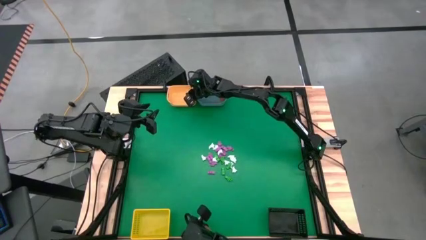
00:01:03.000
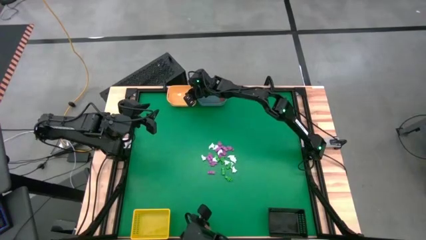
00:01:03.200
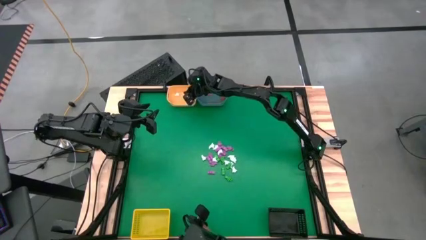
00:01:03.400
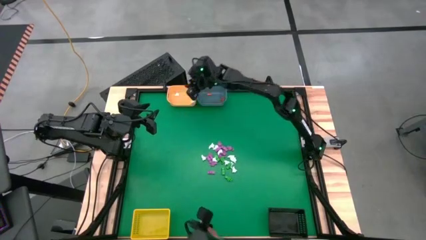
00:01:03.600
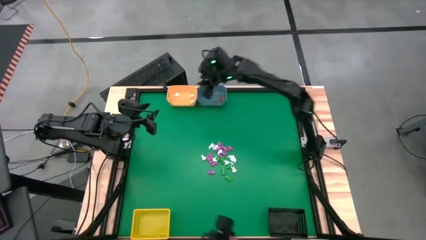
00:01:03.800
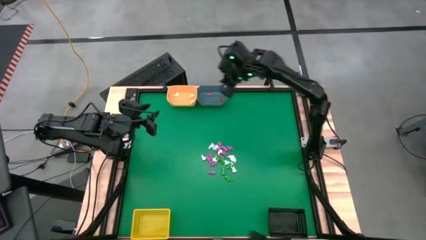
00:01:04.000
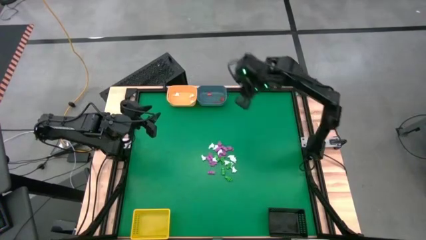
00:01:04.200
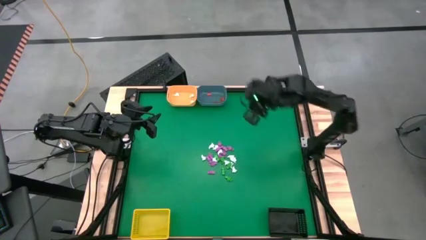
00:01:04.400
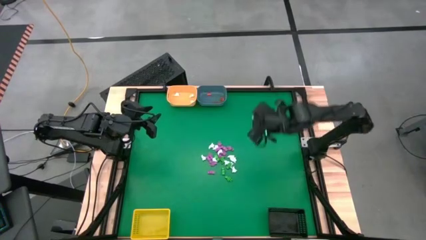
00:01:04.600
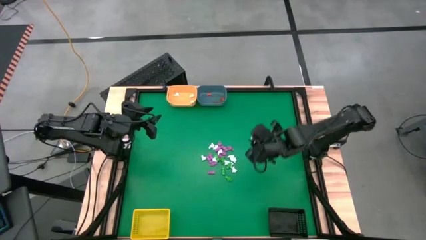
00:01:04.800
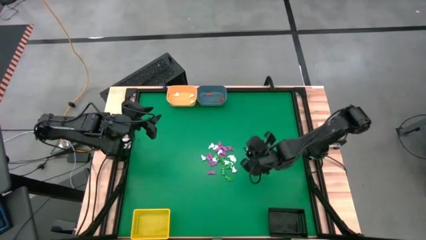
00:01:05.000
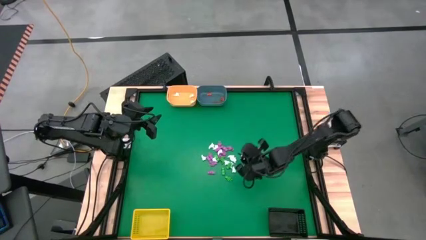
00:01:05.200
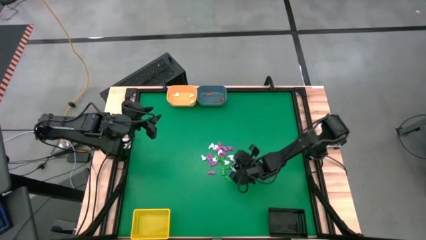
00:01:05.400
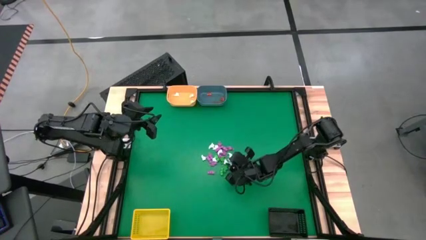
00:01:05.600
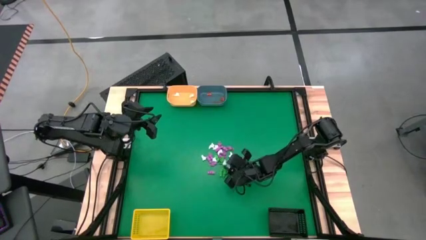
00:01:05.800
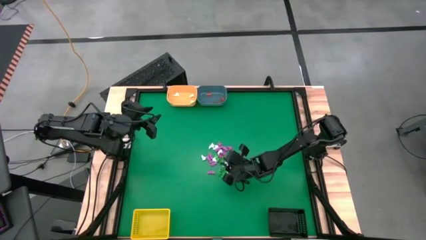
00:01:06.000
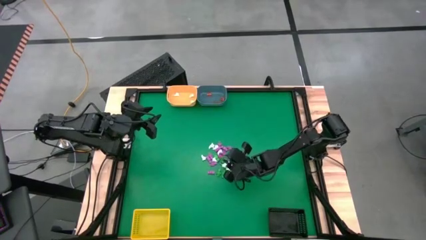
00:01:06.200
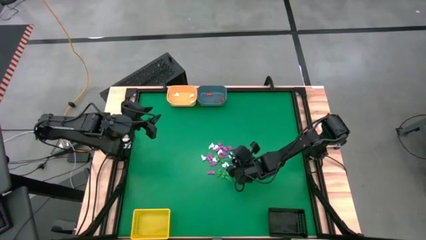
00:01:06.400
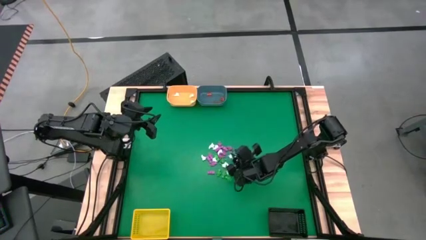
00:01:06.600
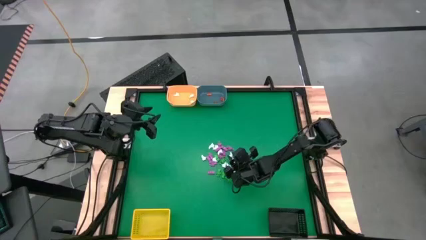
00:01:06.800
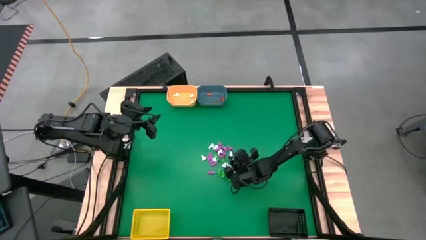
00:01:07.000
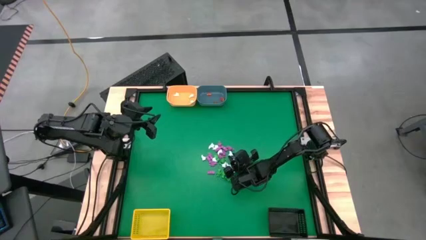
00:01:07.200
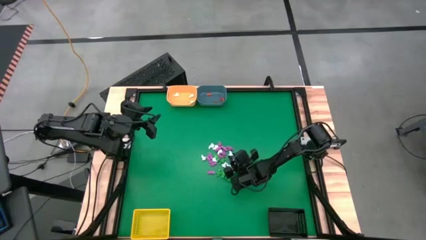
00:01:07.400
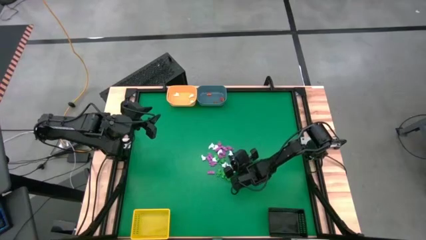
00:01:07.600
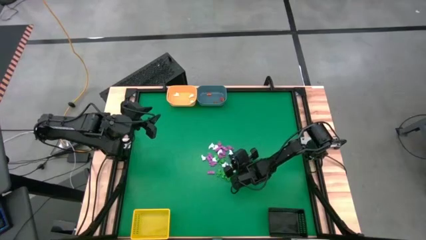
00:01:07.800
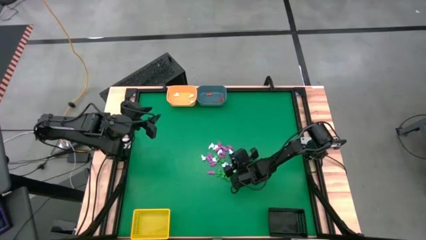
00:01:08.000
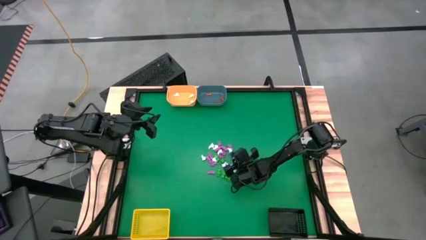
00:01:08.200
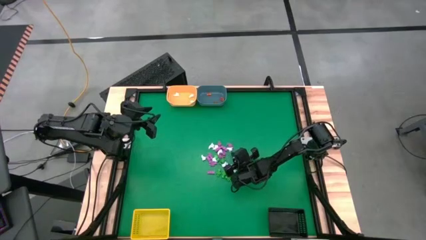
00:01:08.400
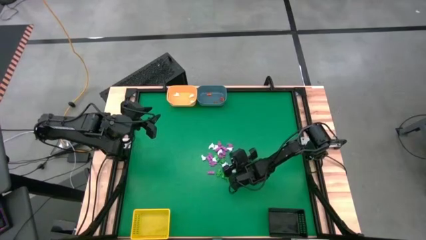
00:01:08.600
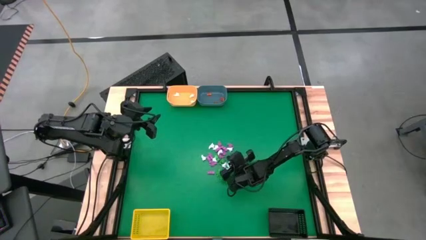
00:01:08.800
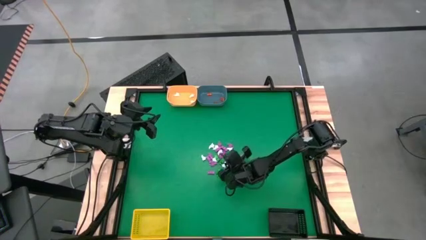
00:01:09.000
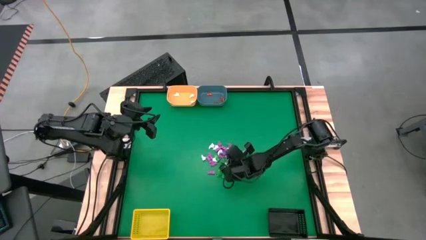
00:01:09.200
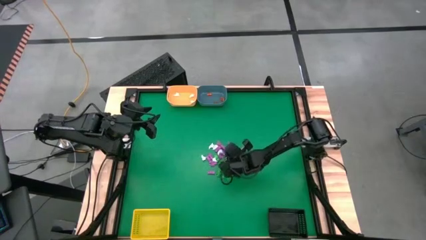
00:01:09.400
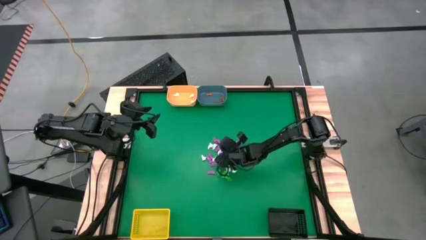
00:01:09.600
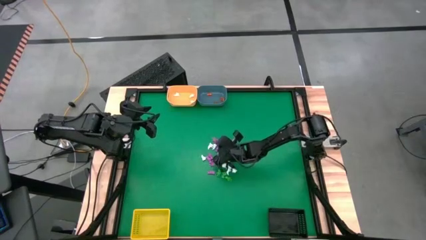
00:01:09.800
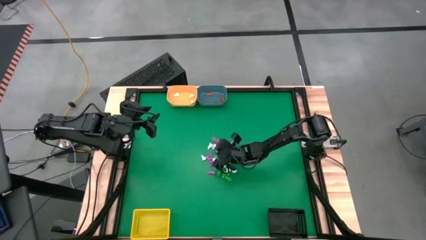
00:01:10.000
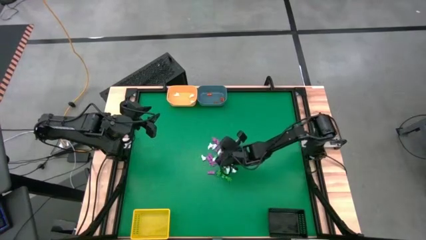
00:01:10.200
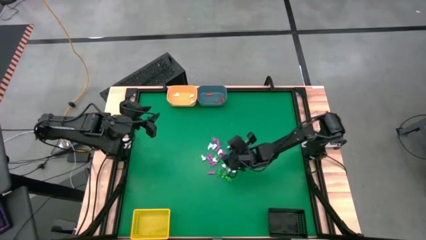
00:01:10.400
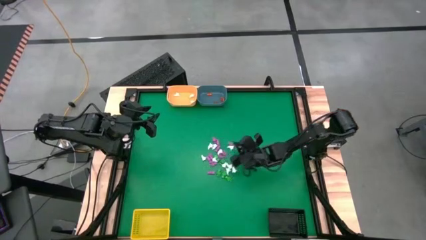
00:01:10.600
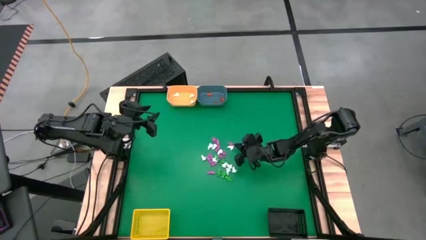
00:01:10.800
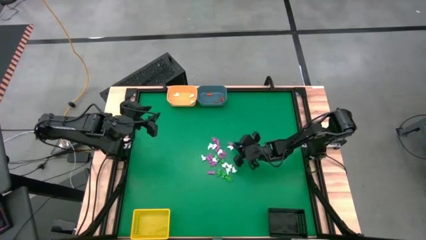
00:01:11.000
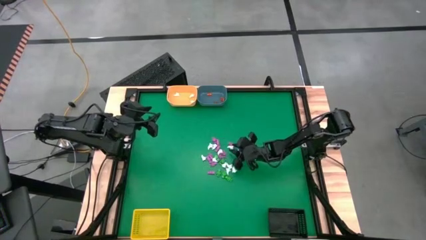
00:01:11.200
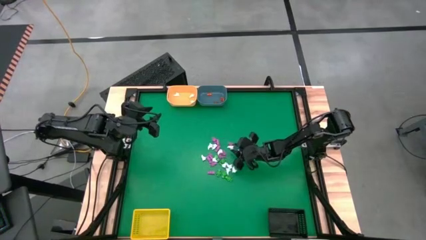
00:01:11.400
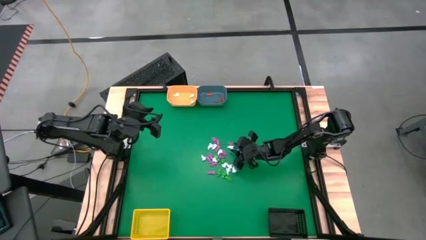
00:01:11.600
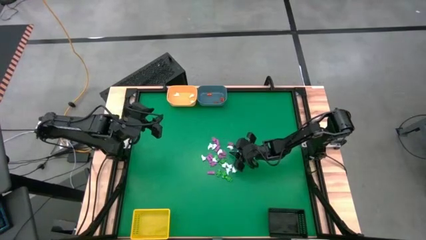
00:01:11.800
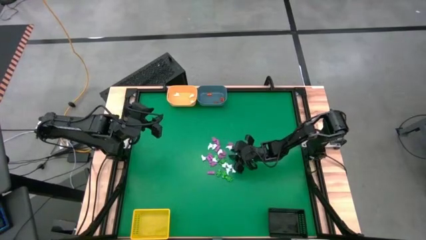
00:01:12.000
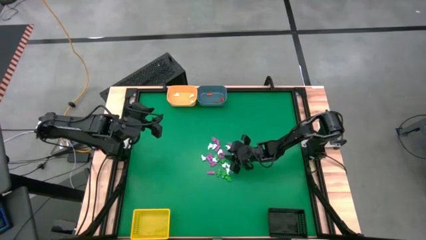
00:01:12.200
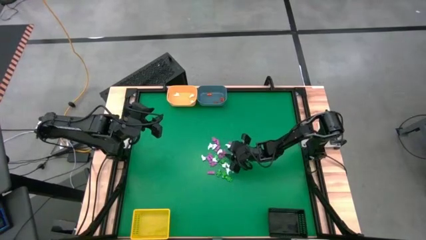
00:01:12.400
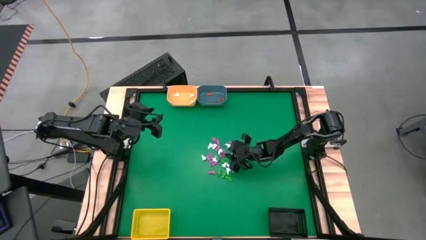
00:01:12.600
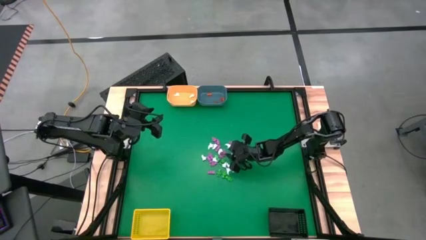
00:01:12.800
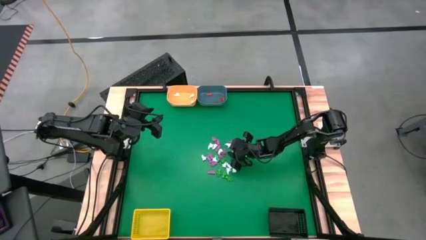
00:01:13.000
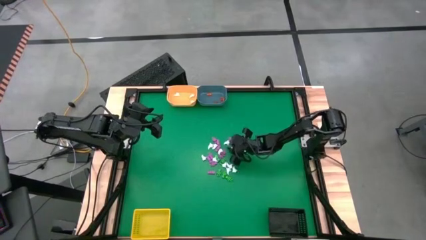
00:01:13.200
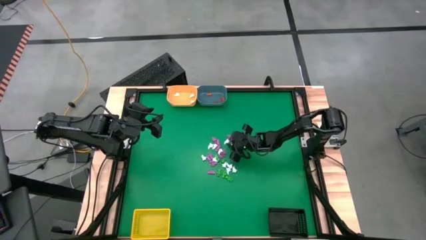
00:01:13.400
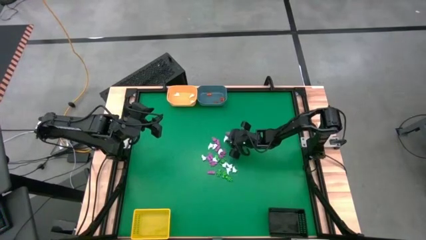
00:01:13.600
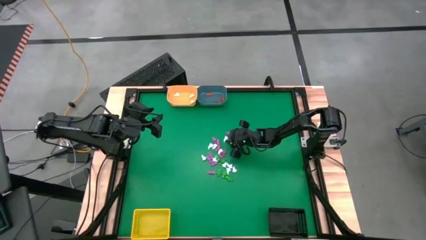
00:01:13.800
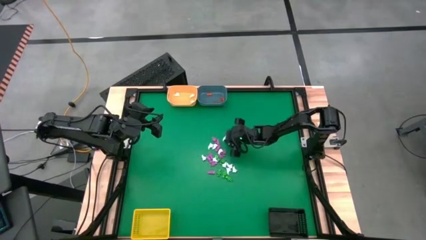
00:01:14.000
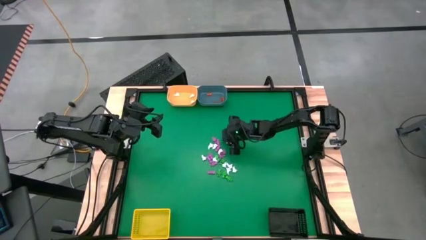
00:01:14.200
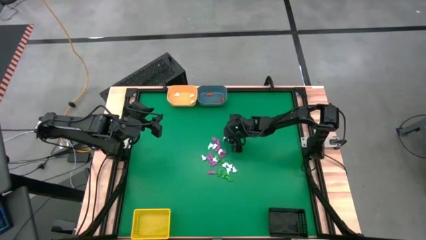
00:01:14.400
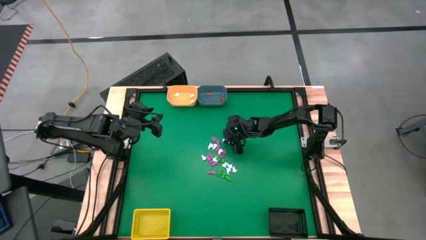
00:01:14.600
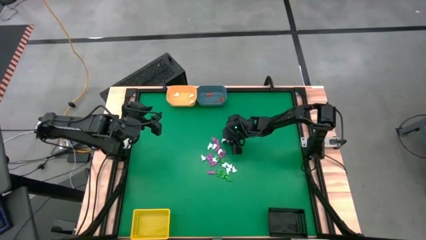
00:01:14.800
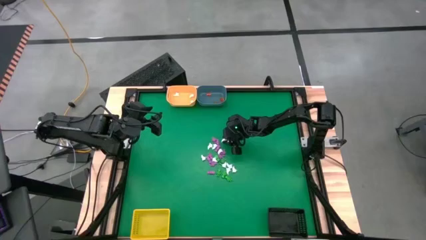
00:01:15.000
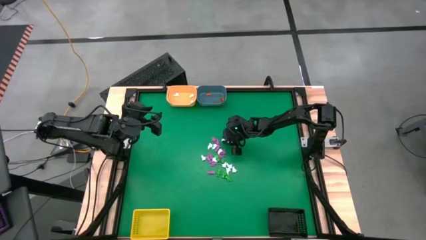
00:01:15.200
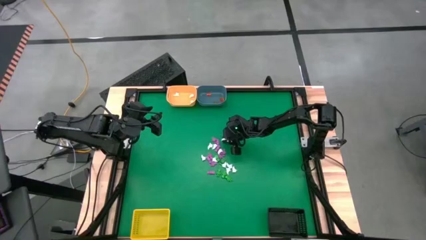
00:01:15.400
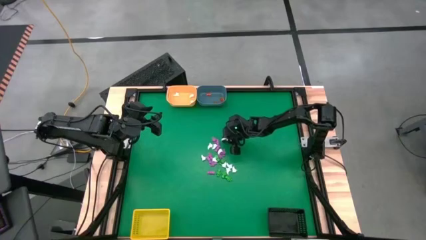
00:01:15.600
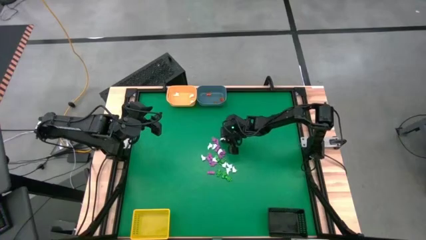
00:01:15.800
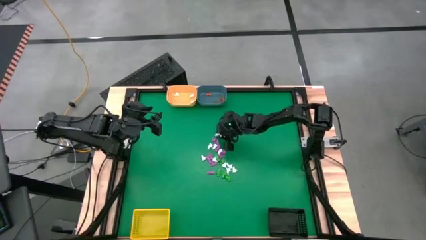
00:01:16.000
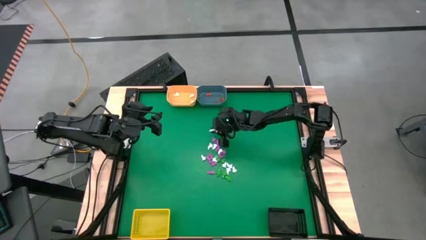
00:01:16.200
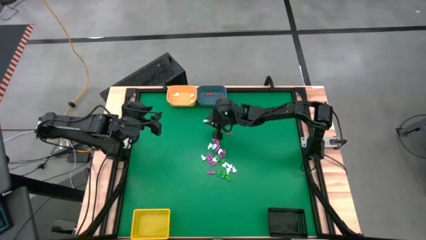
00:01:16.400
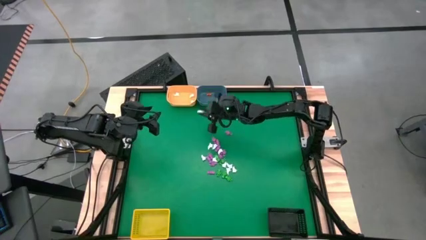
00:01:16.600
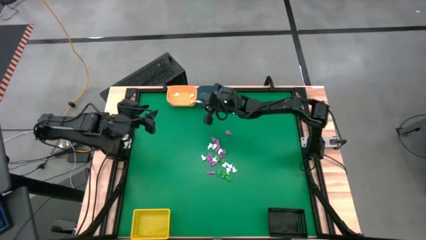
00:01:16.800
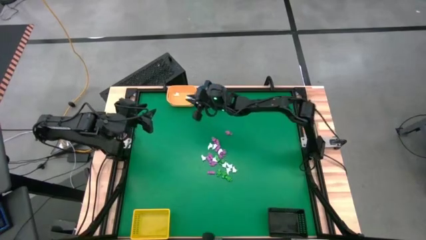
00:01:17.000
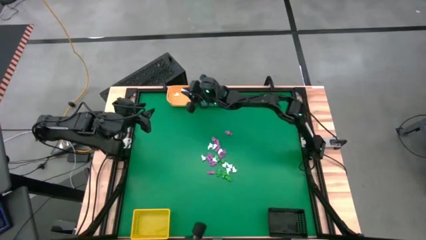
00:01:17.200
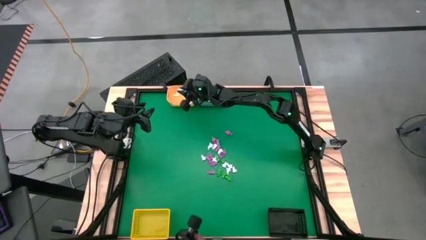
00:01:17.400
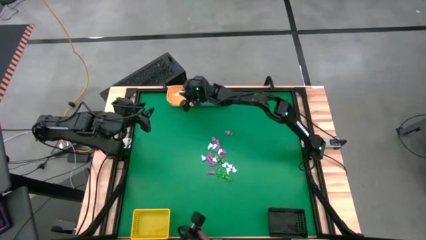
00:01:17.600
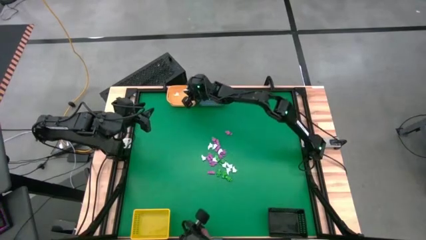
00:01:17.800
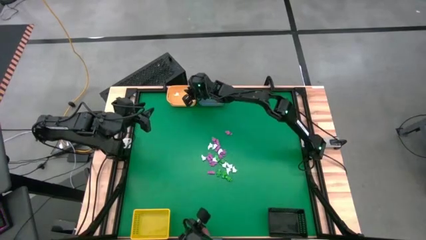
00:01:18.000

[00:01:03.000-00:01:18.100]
Task: Sort Halloween decoration
Put the white ghost into the orange bin
